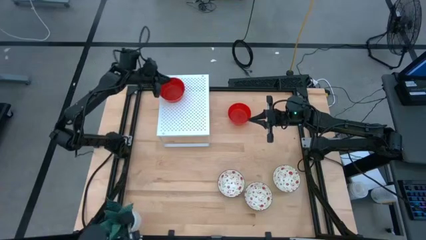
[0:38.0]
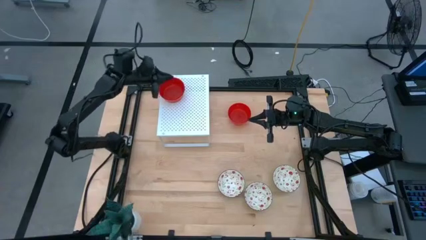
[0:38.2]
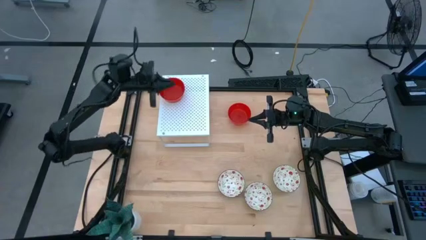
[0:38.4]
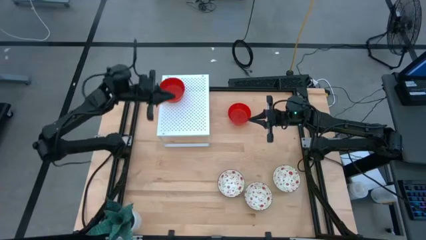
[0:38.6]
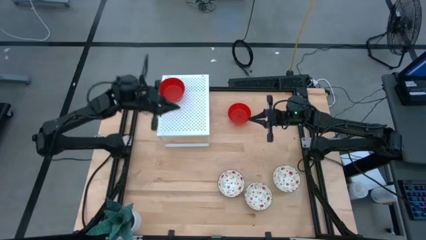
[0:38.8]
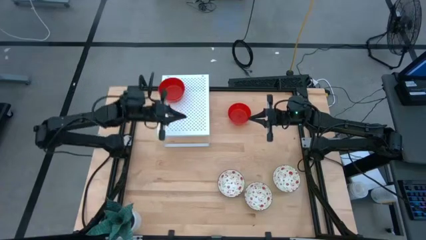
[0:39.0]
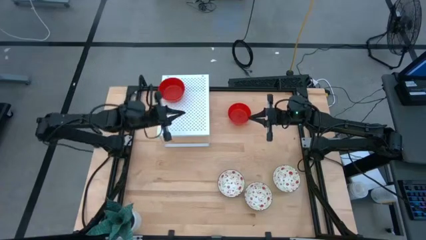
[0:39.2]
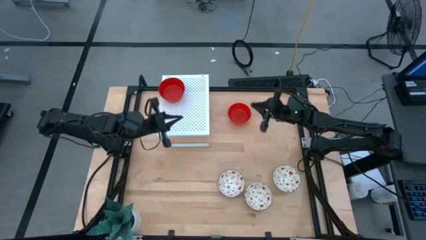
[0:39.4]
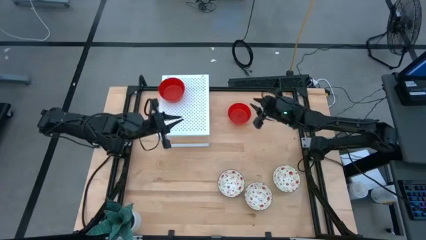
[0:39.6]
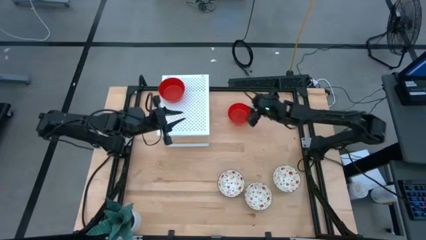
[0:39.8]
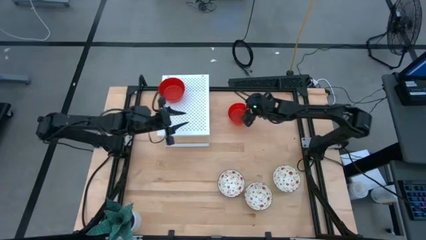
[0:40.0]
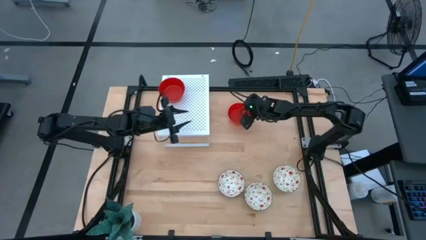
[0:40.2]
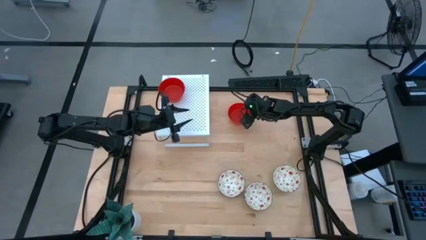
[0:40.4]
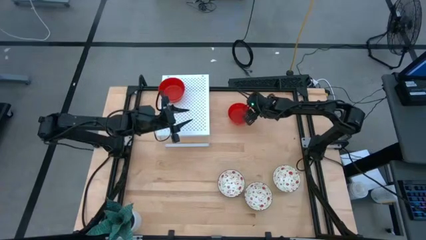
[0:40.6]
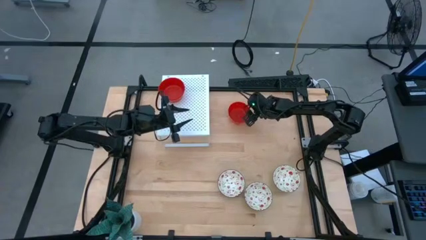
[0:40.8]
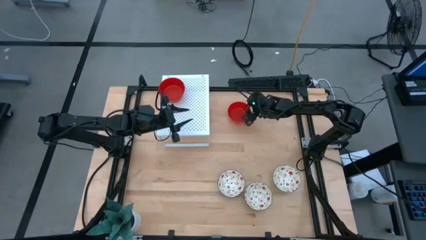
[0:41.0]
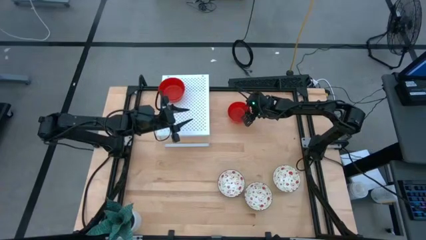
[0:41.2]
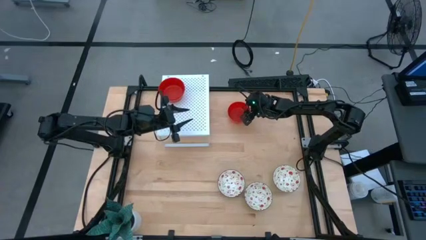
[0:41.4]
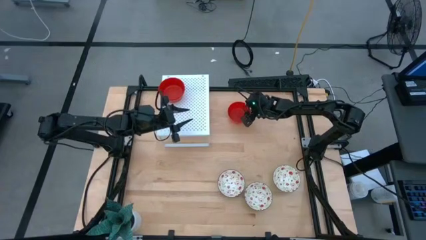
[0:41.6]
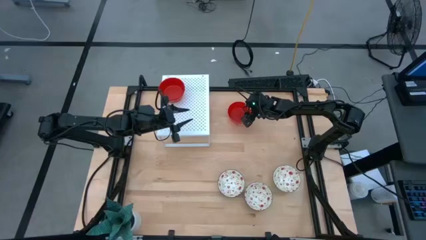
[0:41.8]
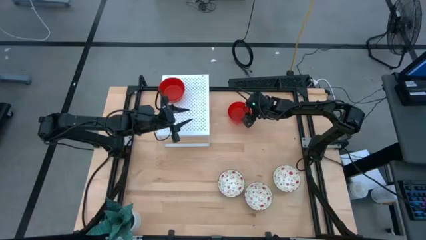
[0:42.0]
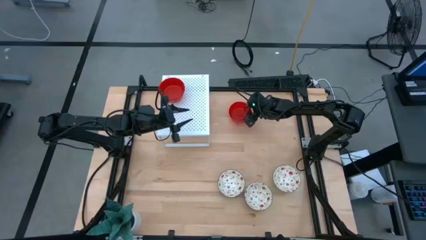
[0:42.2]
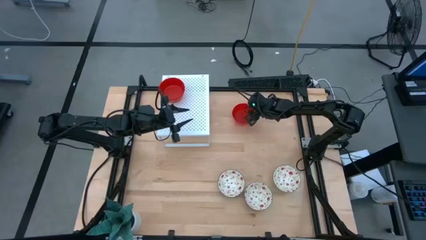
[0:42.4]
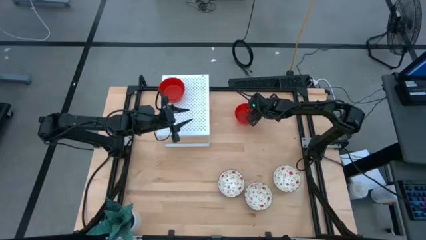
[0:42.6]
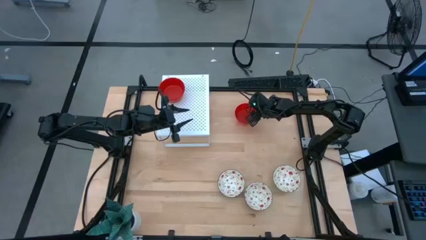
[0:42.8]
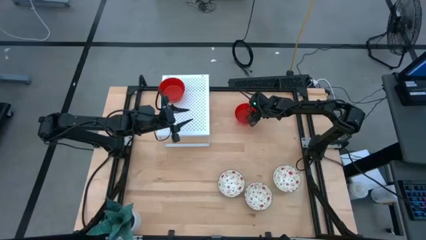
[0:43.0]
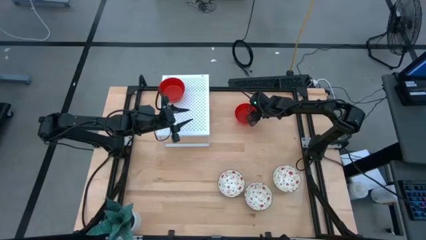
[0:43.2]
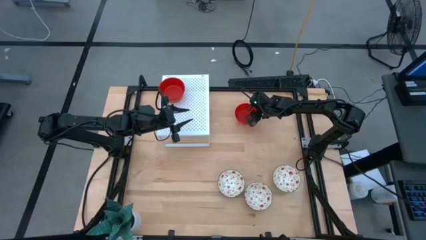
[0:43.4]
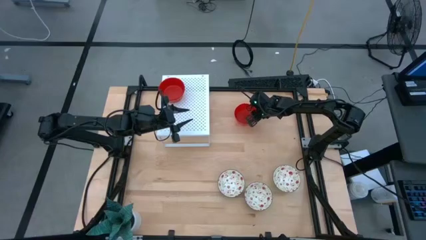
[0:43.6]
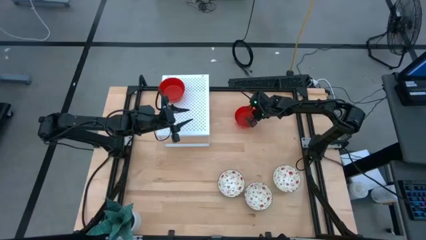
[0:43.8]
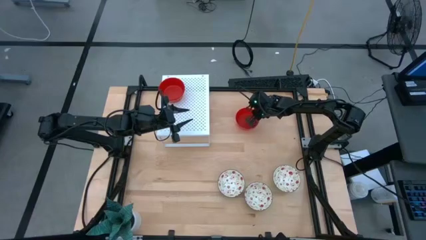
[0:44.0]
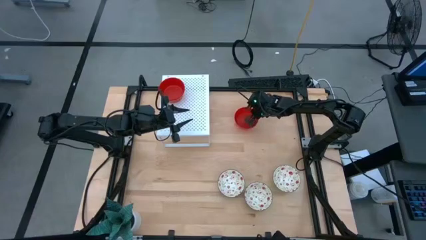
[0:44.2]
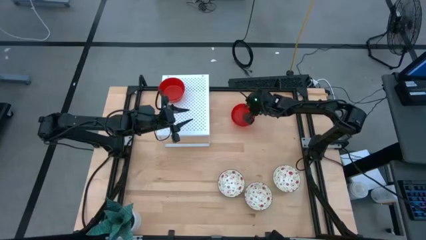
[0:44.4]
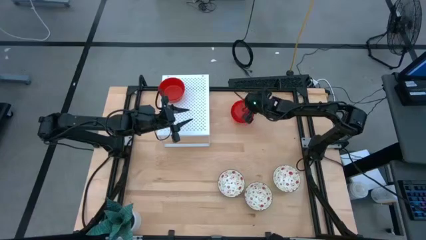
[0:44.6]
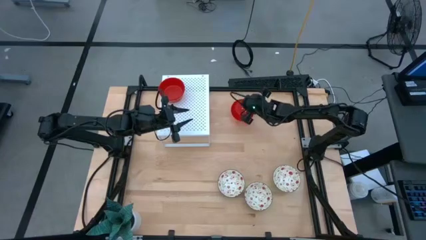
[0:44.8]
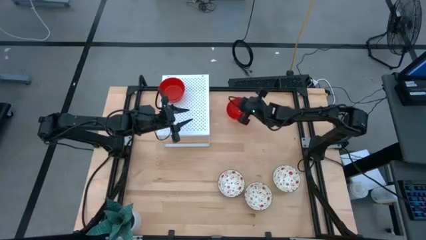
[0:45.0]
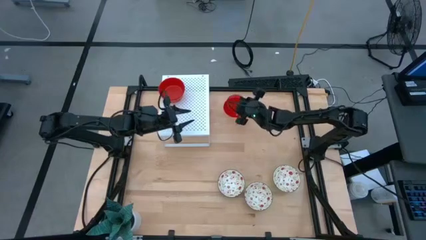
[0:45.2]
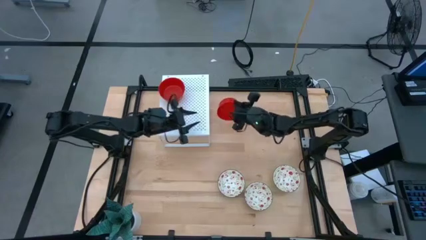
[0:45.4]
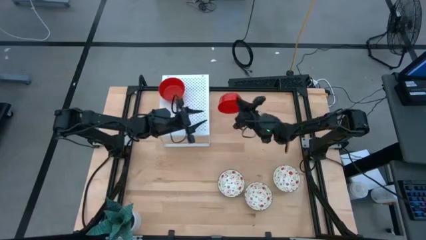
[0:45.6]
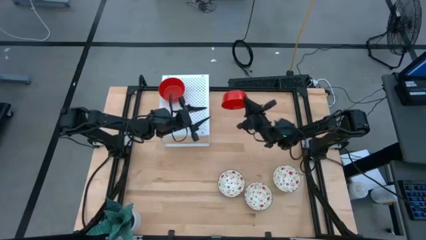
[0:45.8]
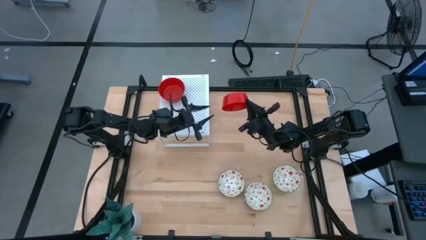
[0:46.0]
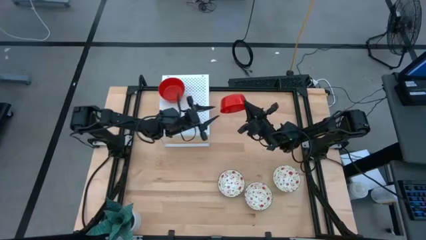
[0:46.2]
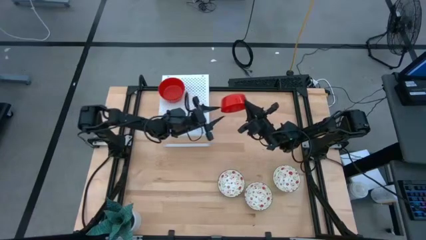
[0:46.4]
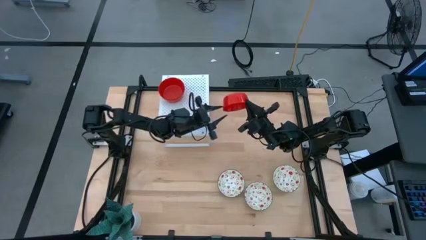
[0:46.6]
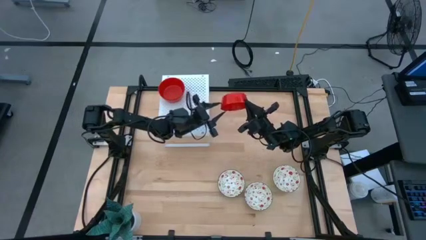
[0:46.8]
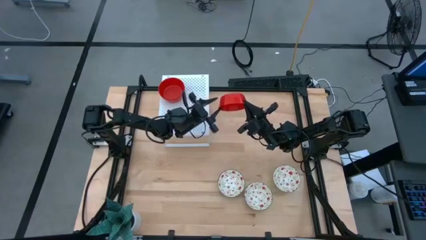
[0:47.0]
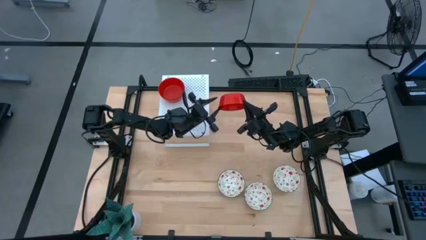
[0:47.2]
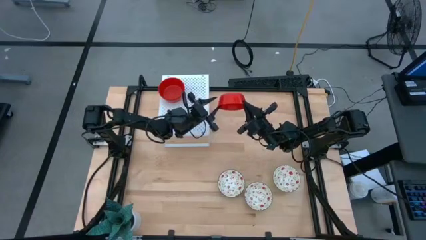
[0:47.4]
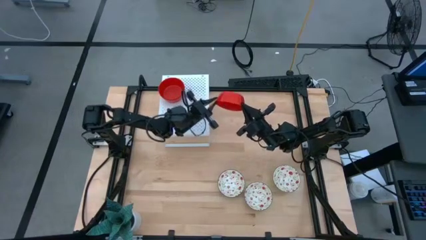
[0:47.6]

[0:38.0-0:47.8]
Task: Pick & Place Mini bowls
Stack the red bowl on top of the red bowls on the shelf
